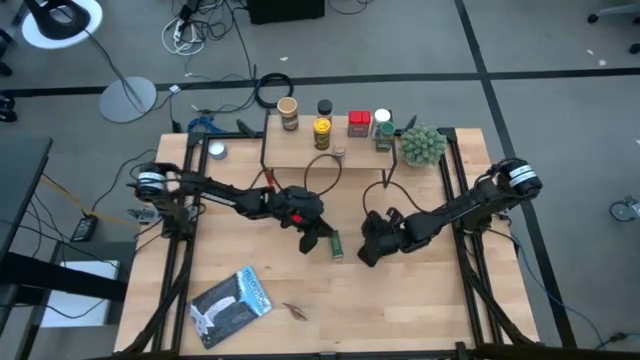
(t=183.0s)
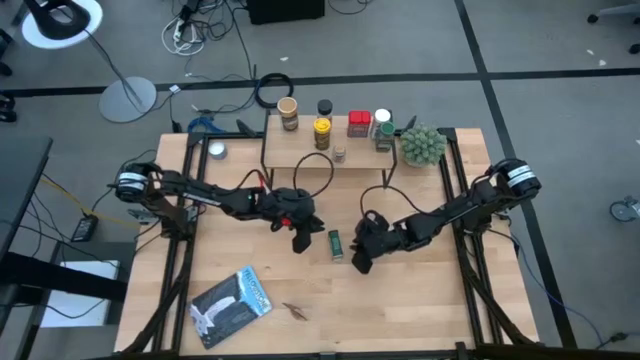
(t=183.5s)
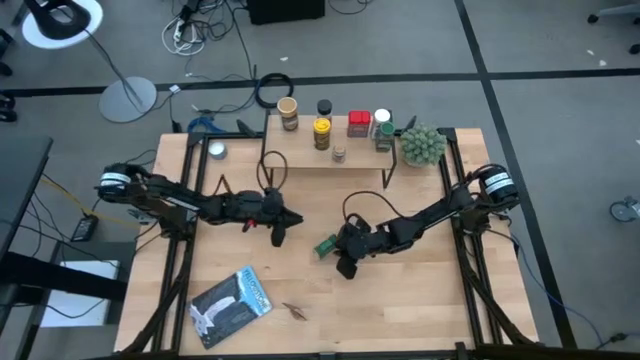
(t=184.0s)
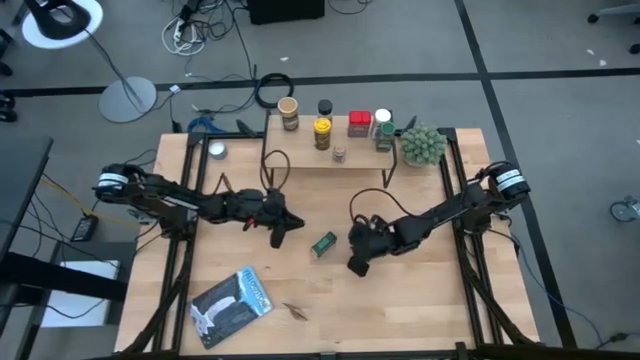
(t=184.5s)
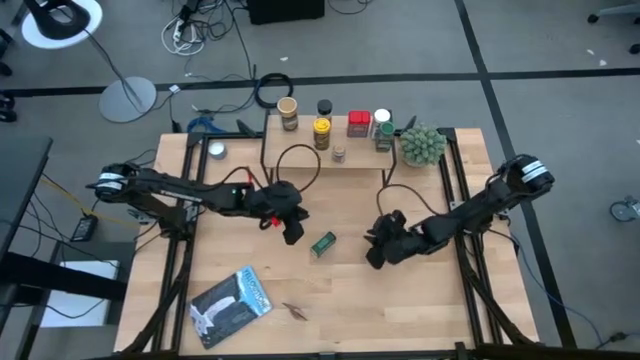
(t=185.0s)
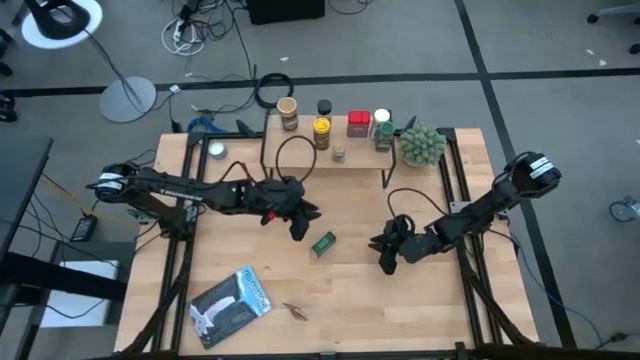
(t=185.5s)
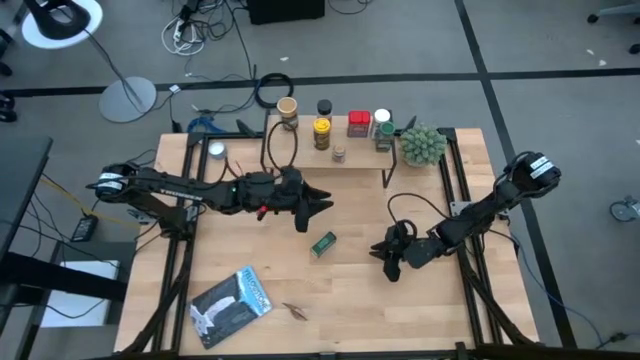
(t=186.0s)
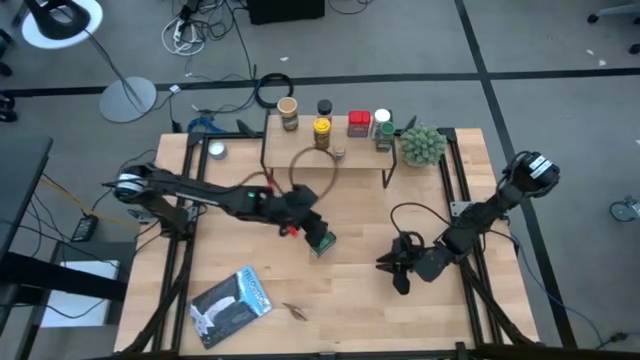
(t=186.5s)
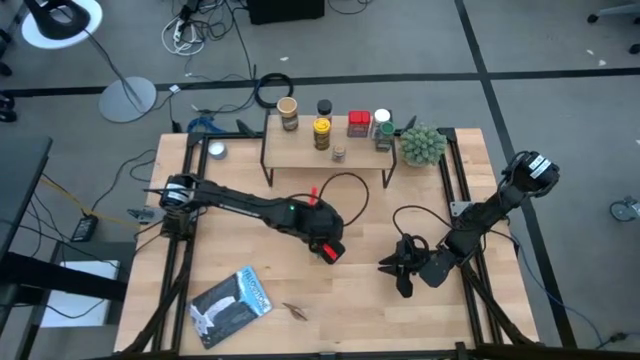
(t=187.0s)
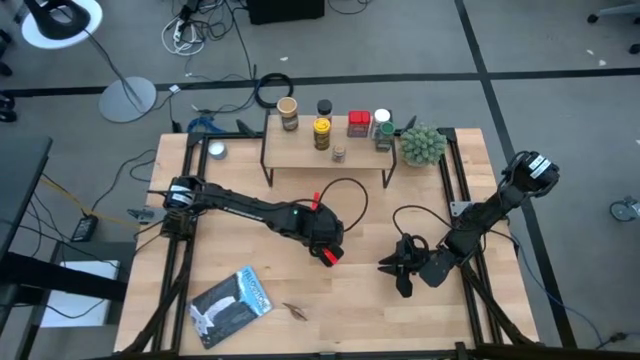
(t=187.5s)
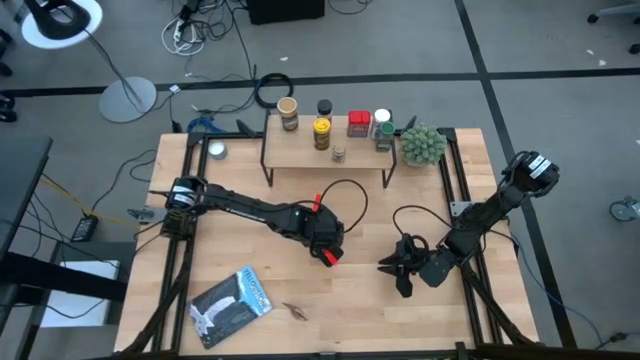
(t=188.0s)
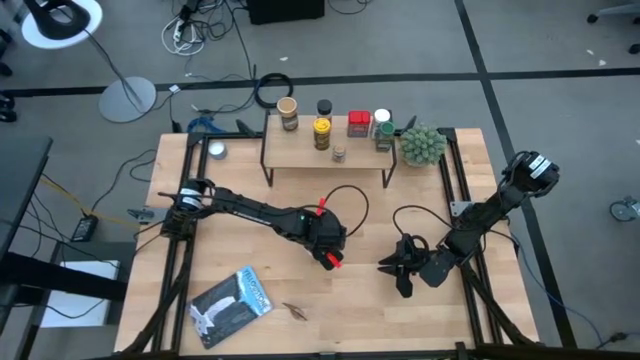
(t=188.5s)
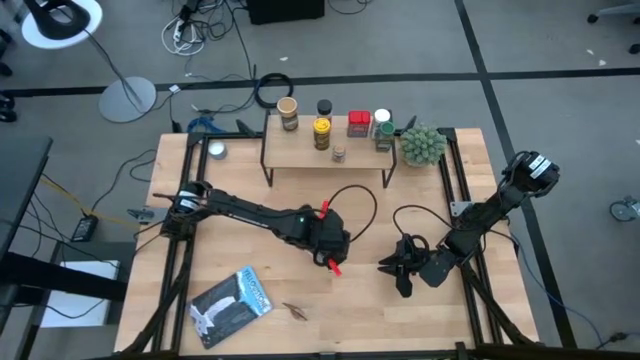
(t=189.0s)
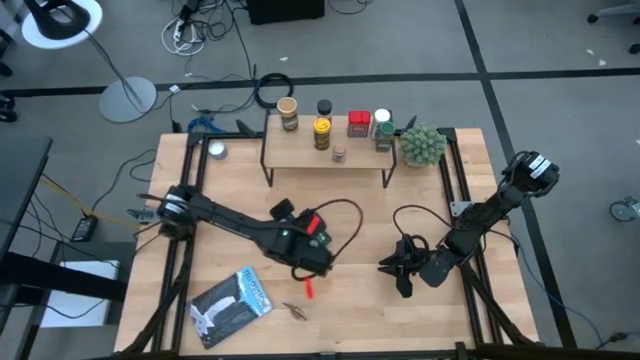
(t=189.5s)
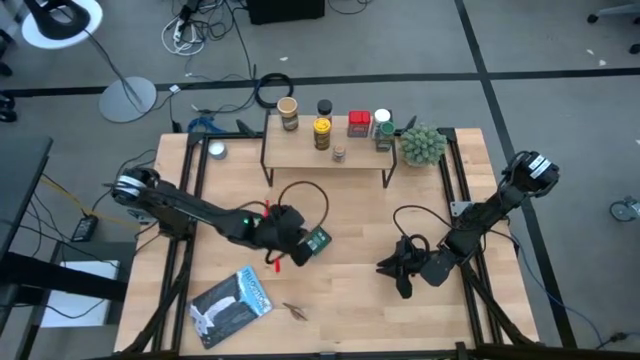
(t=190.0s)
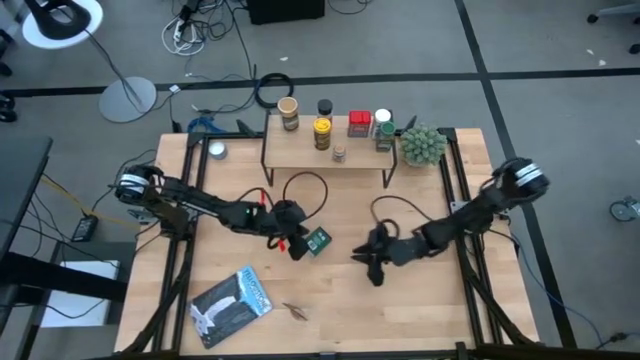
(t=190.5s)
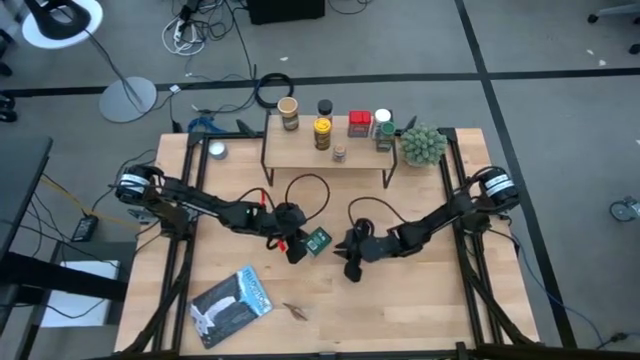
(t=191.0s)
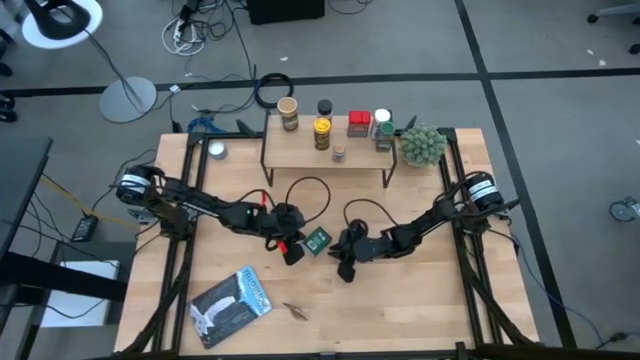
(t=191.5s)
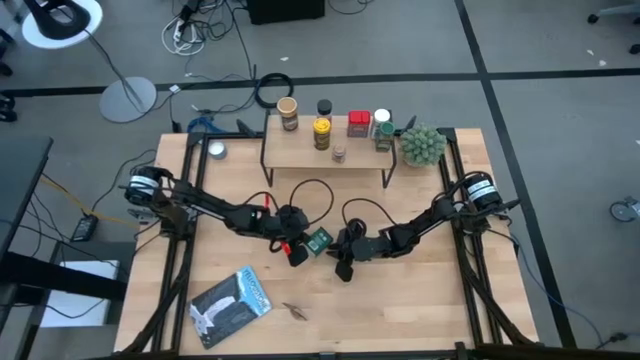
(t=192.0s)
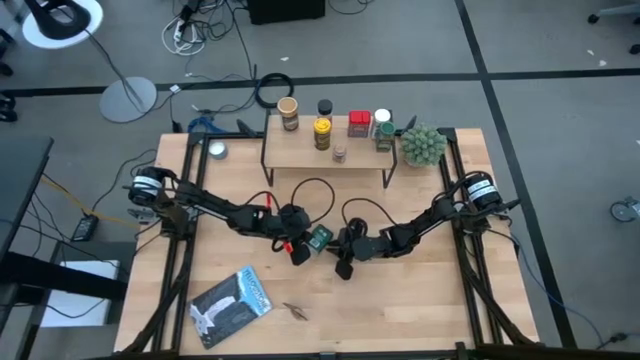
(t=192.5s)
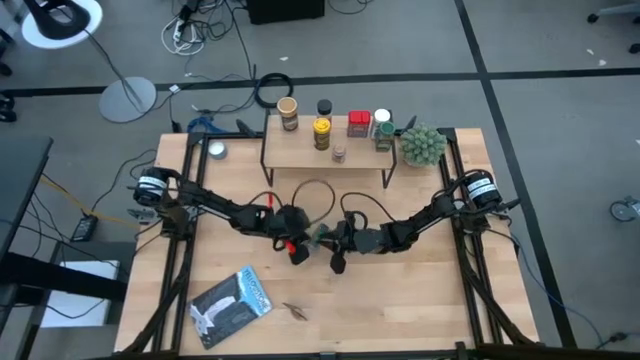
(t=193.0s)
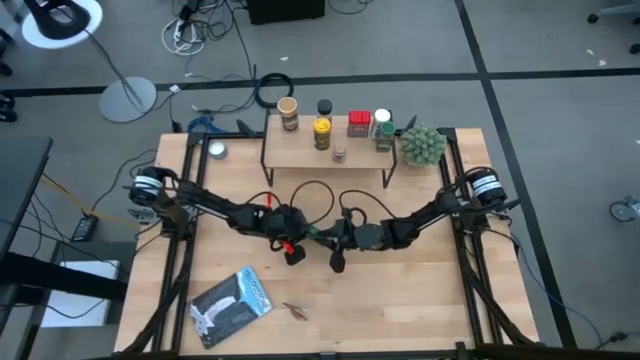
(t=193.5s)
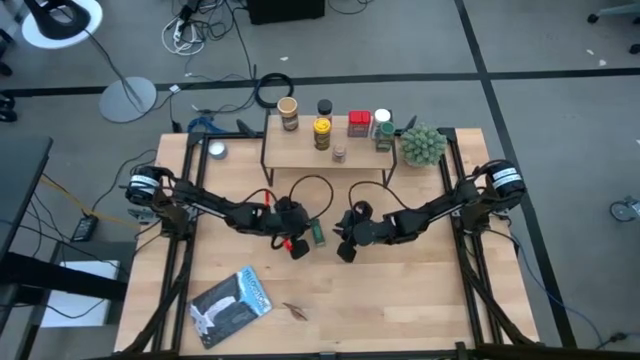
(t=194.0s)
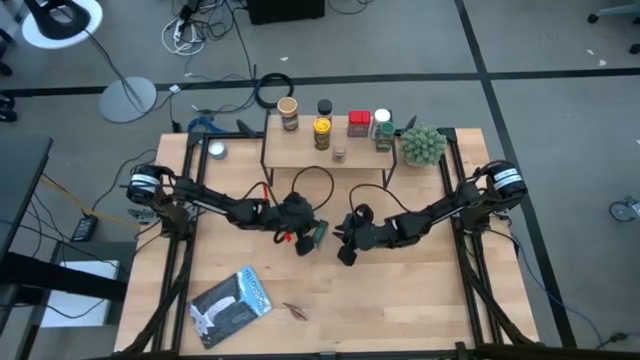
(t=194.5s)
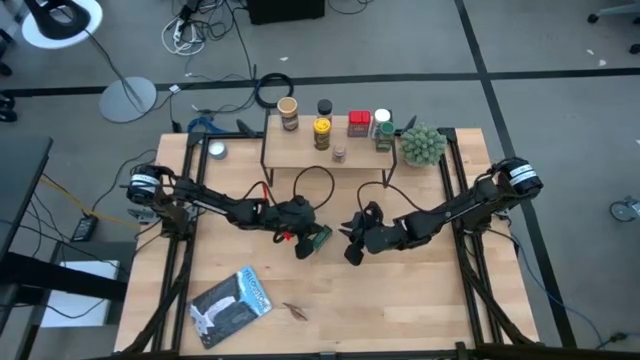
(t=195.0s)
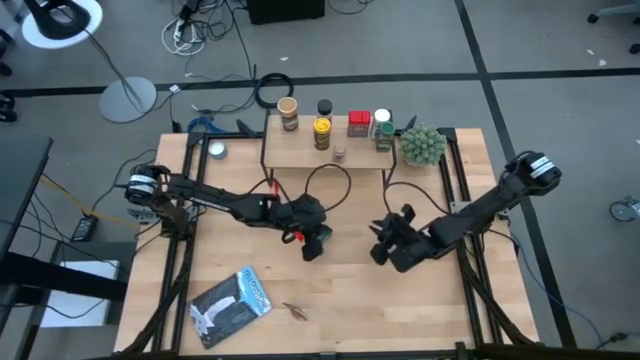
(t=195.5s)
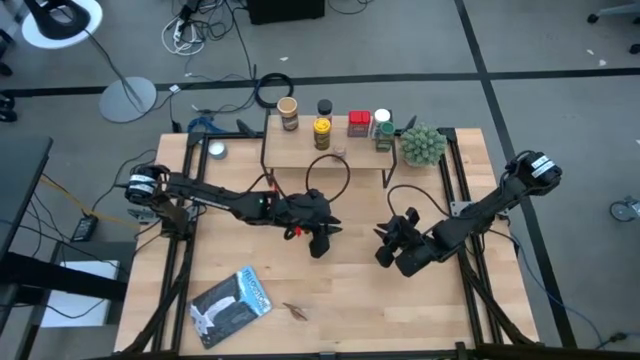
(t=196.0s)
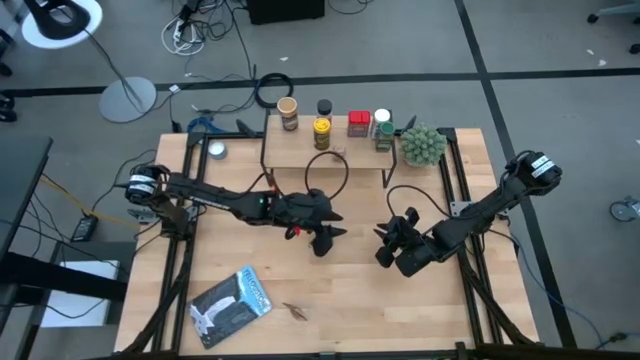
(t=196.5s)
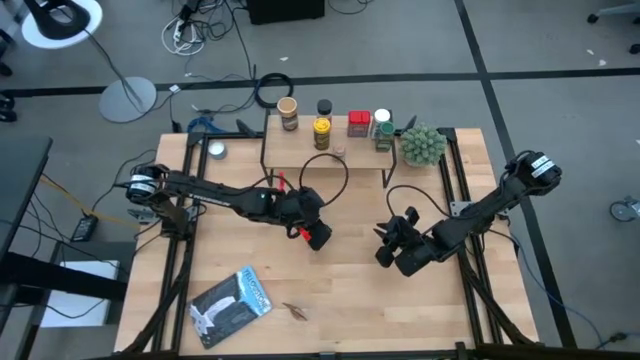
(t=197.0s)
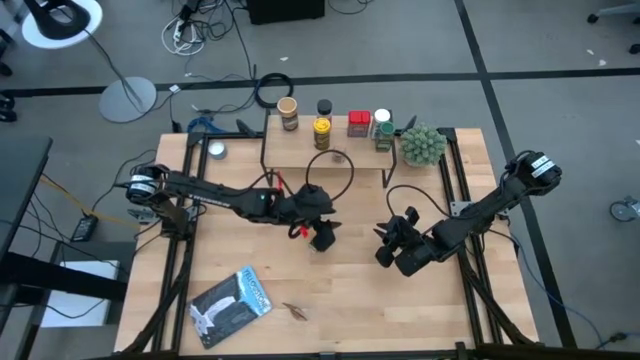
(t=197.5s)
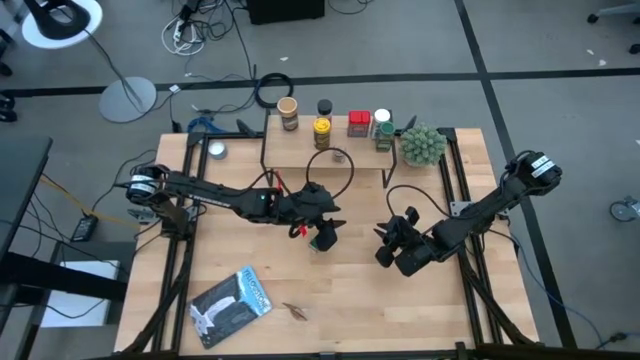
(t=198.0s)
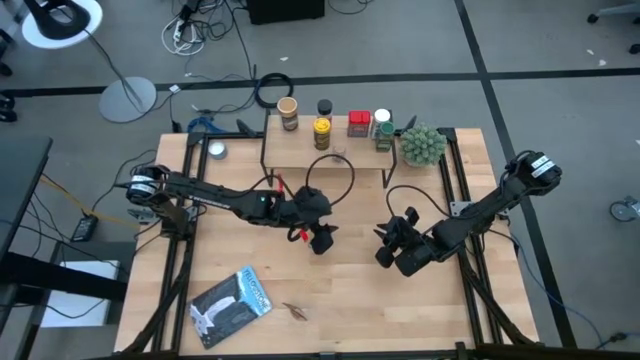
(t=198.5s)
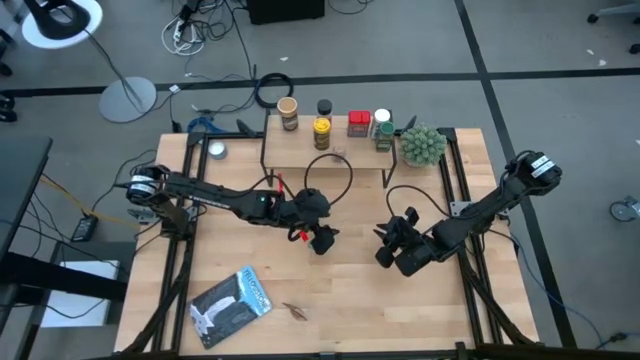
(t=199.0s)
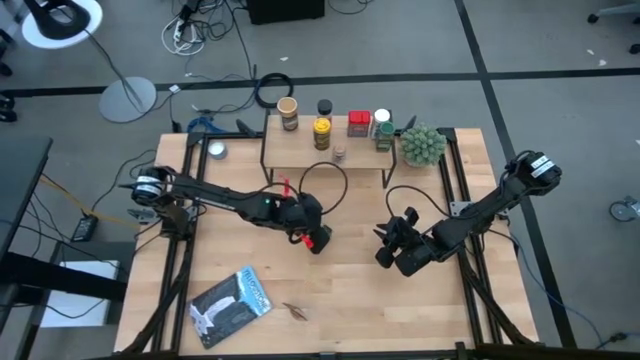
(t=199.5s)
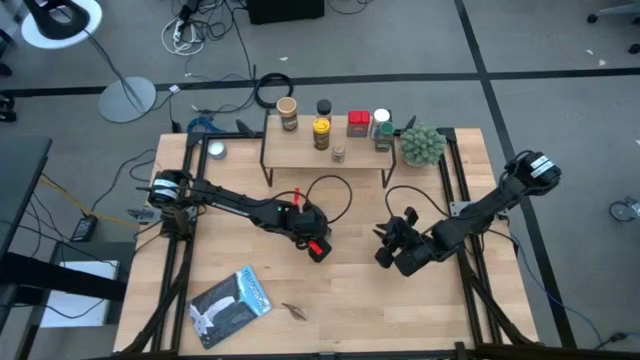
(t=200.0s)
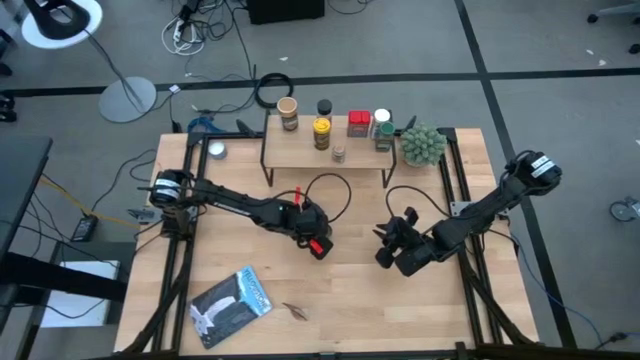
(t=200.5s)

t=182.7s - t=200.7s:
Task: Shelf spices
Put the green seasoning can on the shelf aligned with the other red seasoning can

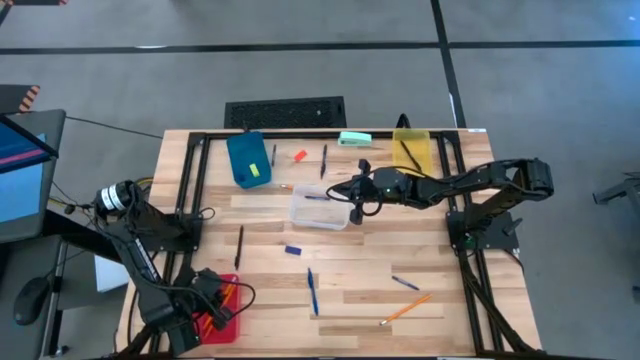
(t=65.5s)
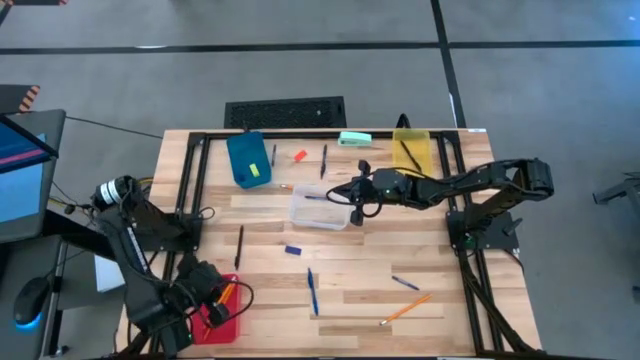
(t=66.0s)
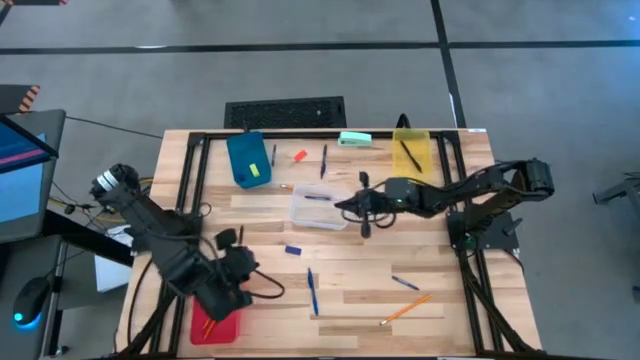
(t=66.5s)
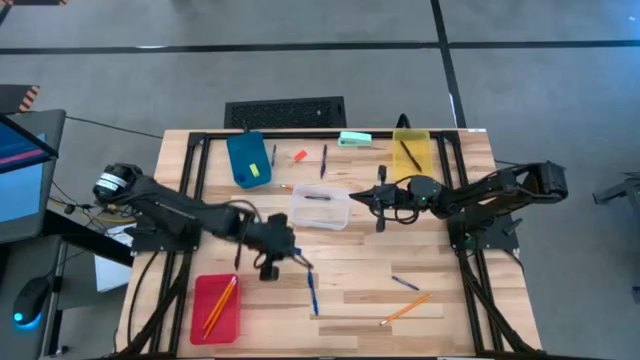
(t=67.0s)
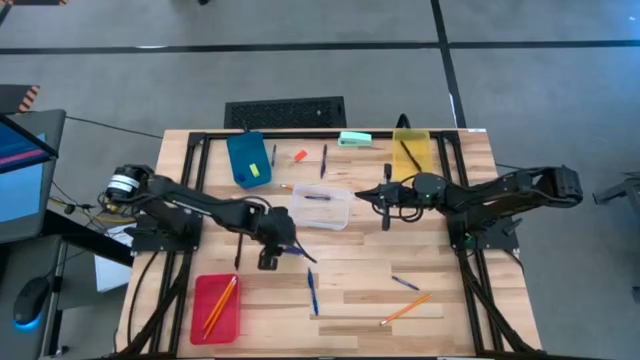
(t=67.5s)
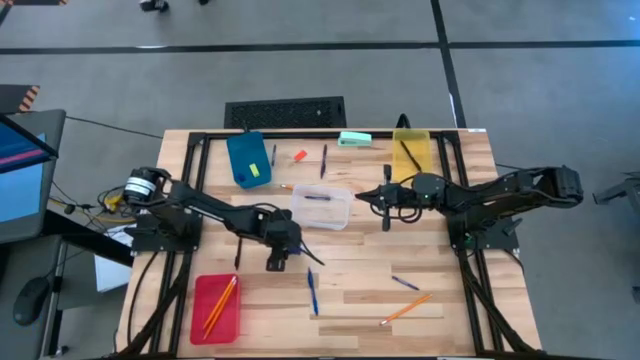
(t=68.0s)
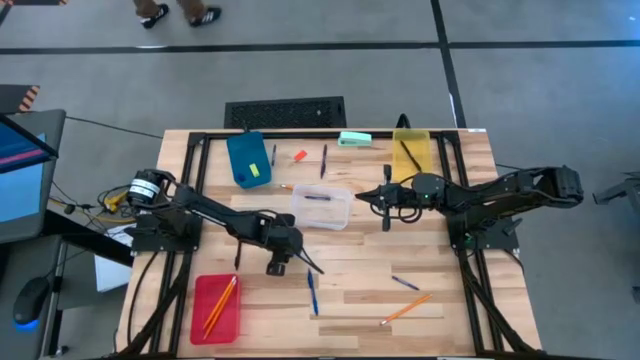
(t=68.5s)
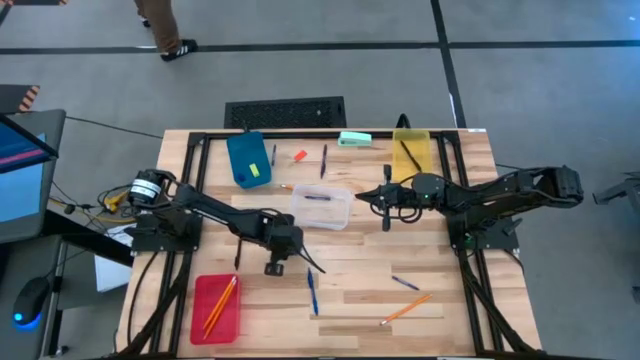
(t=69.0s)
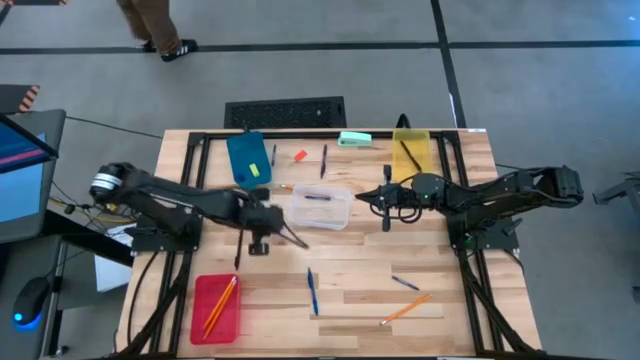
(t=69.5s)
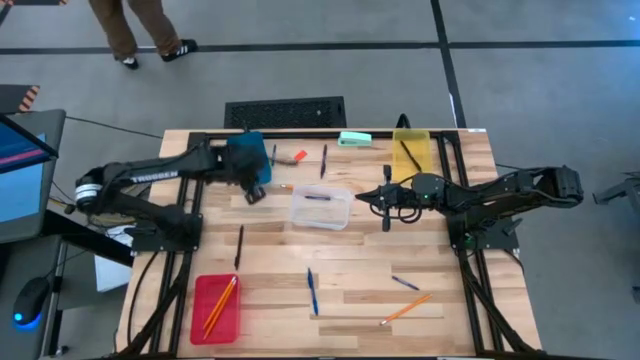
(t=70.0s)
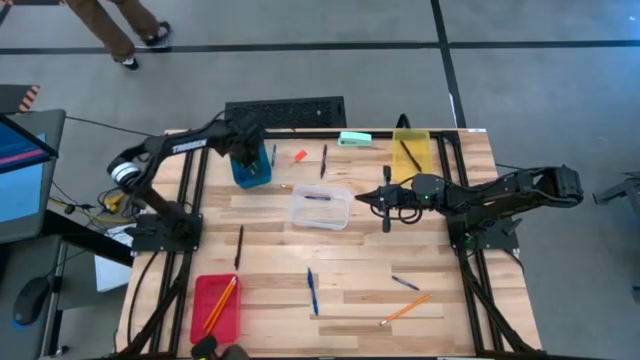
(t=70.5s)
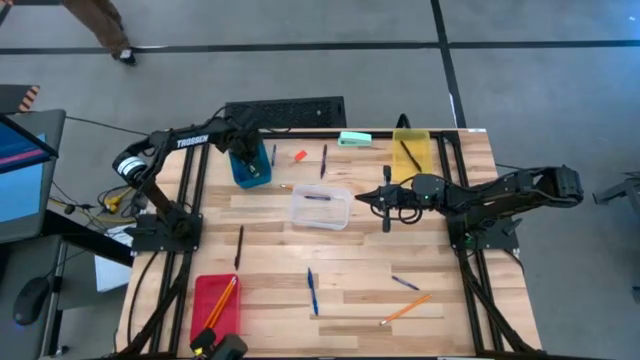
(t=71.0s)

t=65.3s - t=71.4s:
Task: Sort crayons/erasers/pens/pencils in bins
Put the violet eraser into the blue bin
